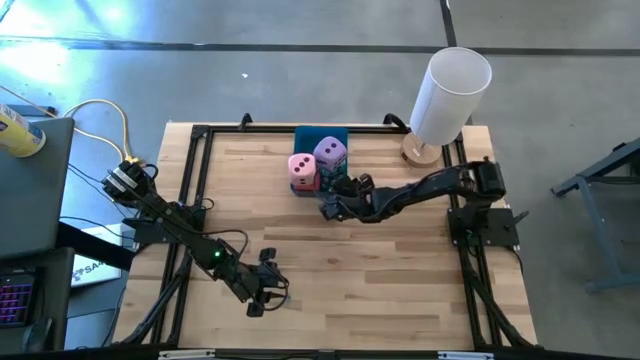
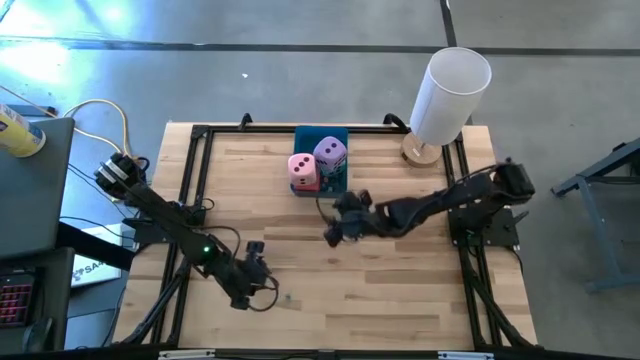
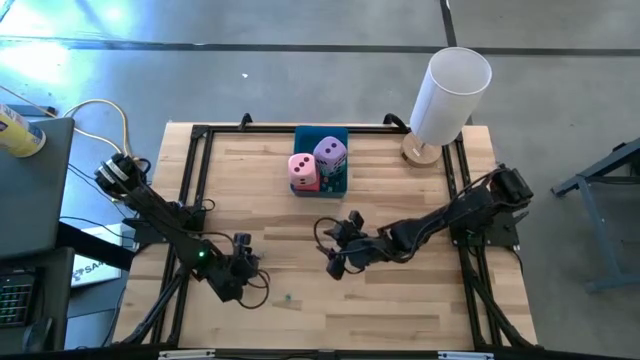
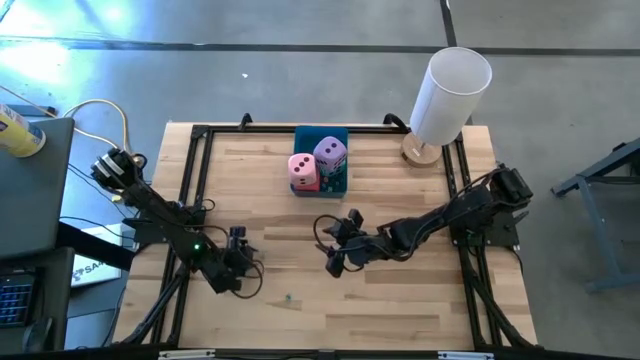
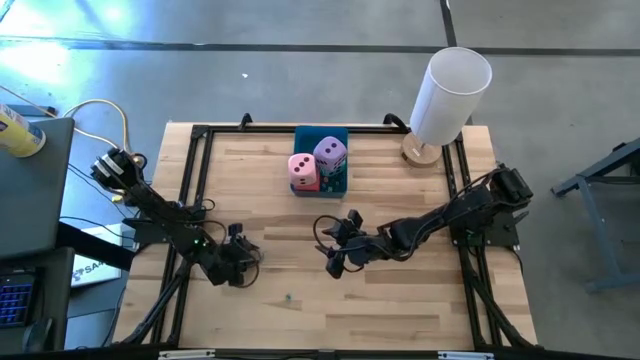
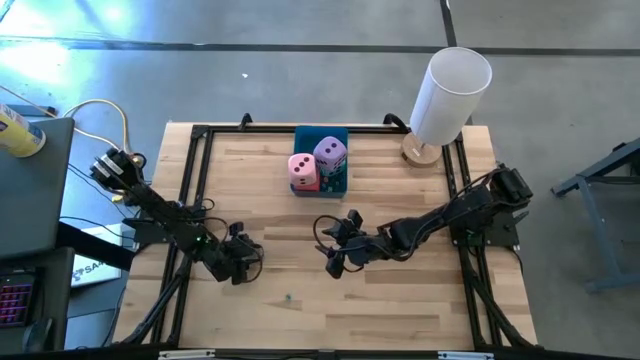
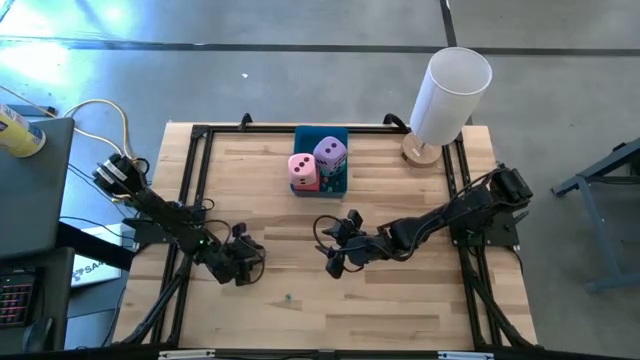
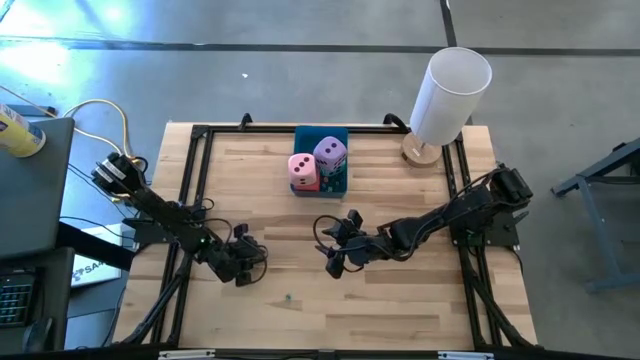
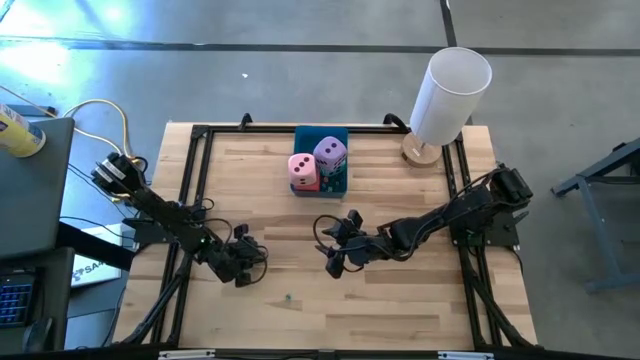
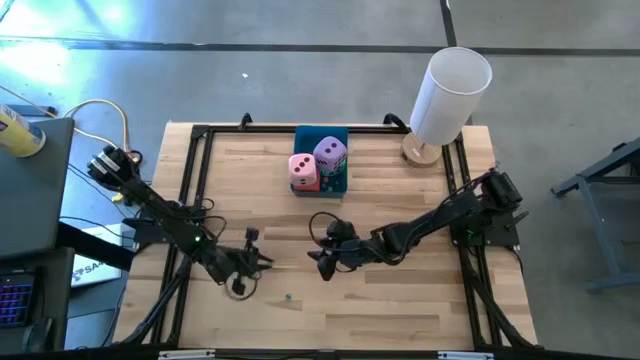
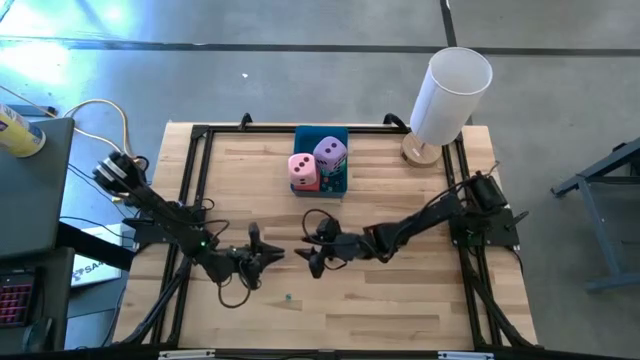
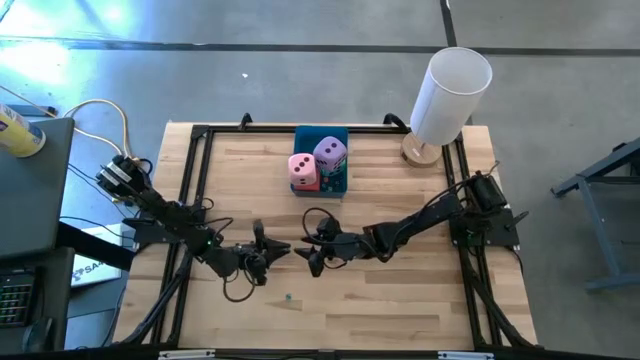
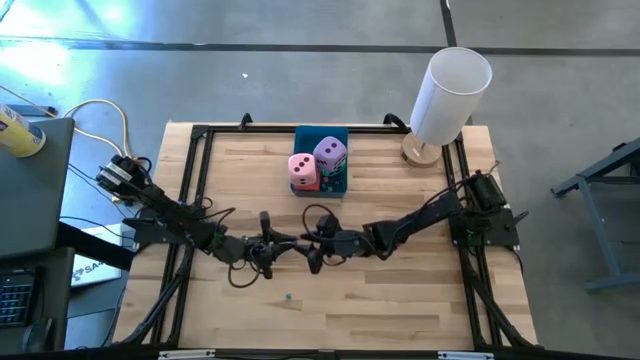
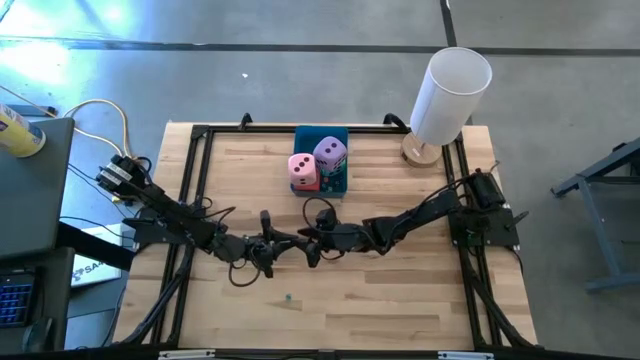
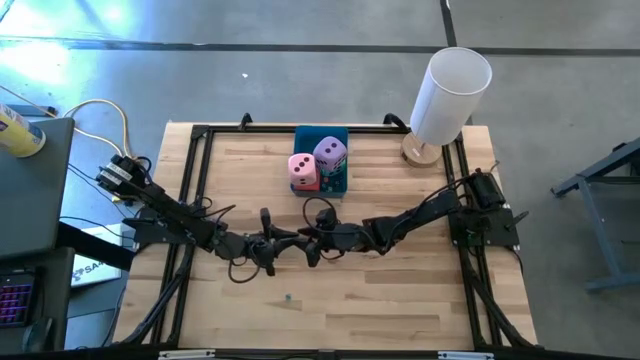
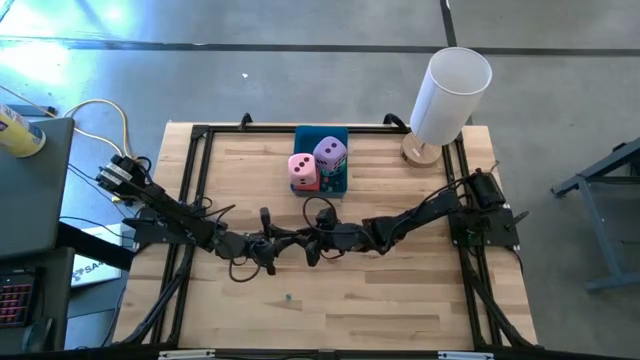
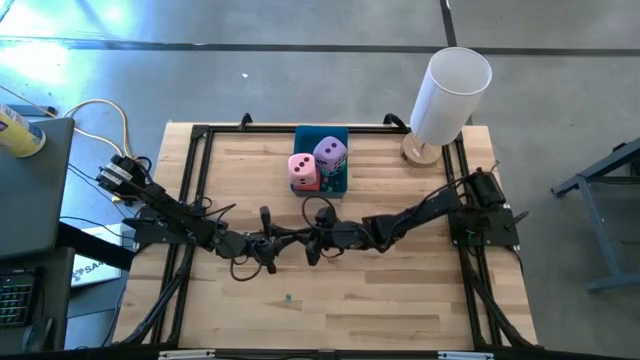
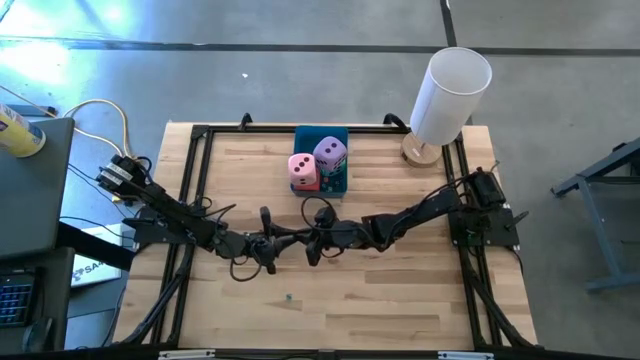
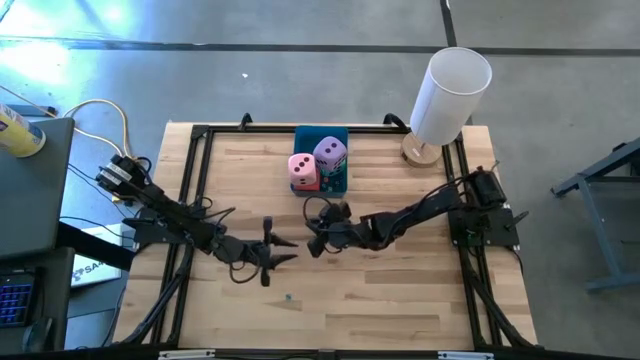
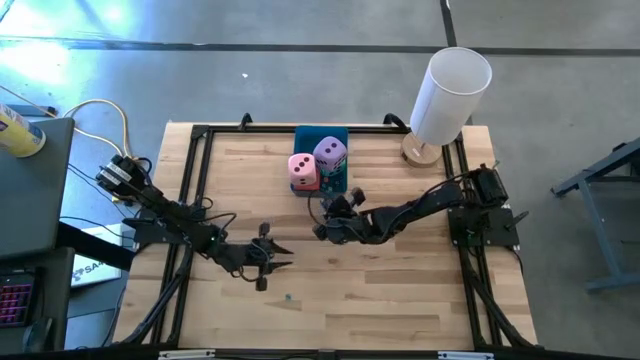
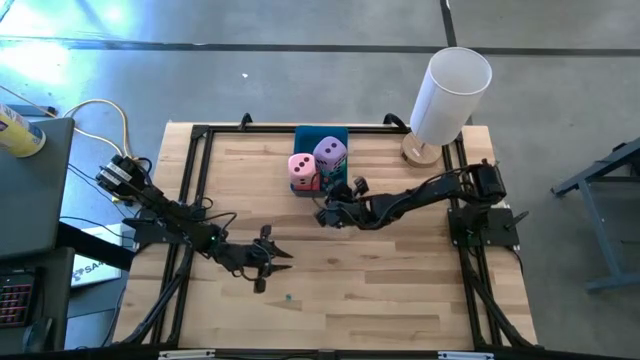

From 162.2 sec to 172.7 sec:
Task: Pick & Place Dice
Put the top small light blue die into the blue bin

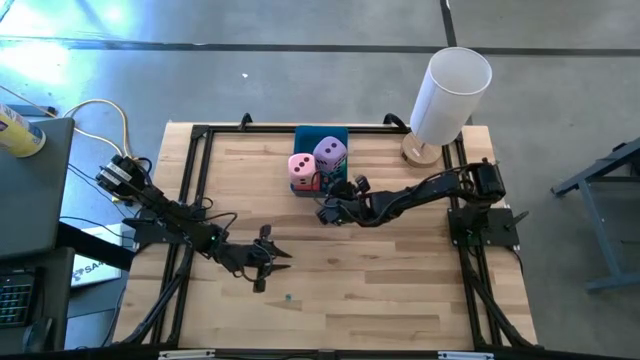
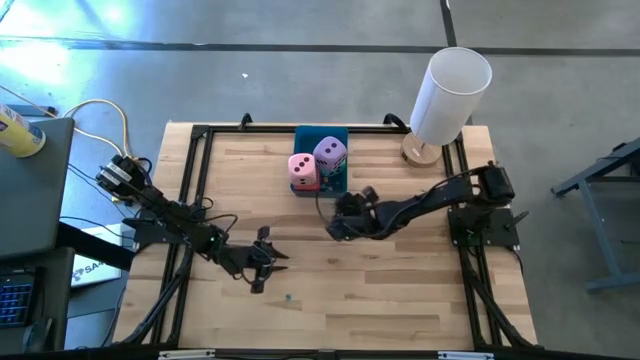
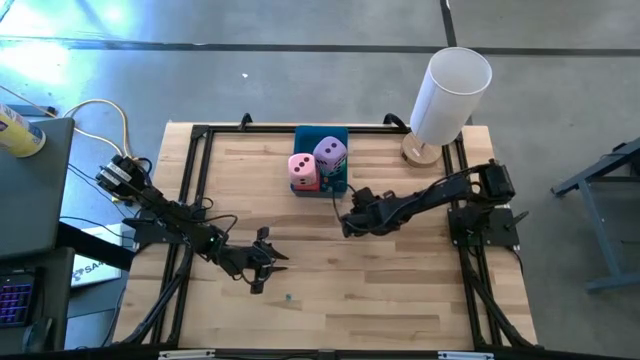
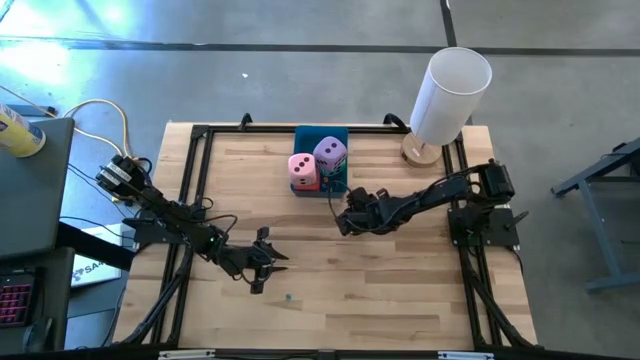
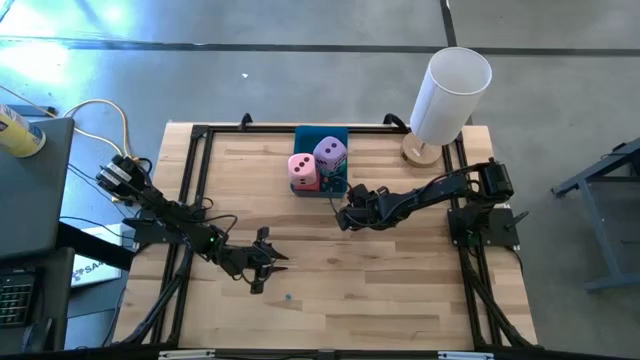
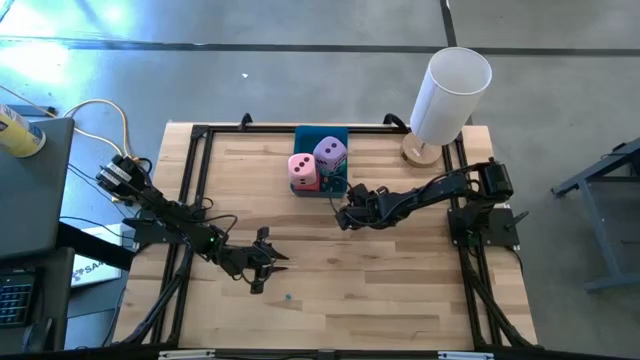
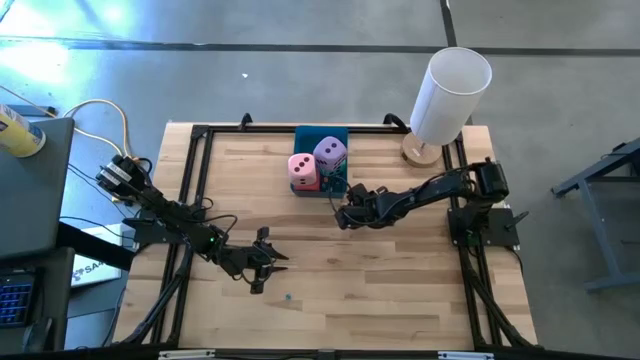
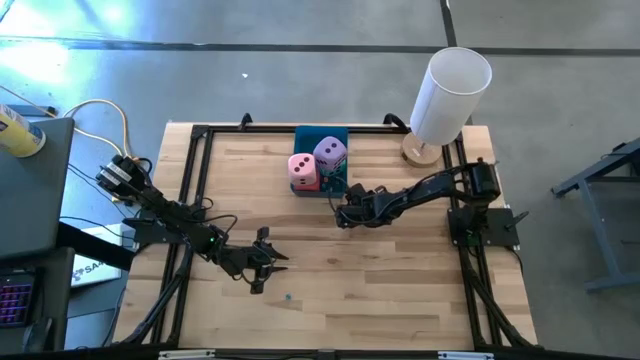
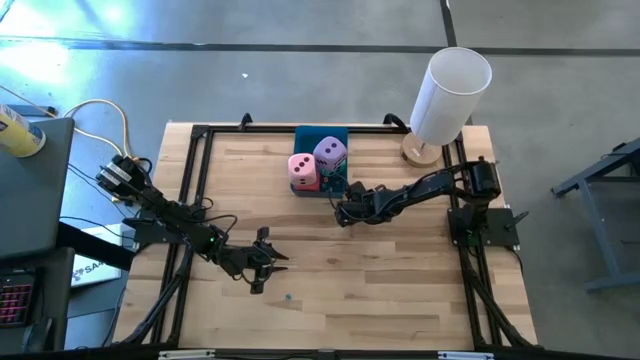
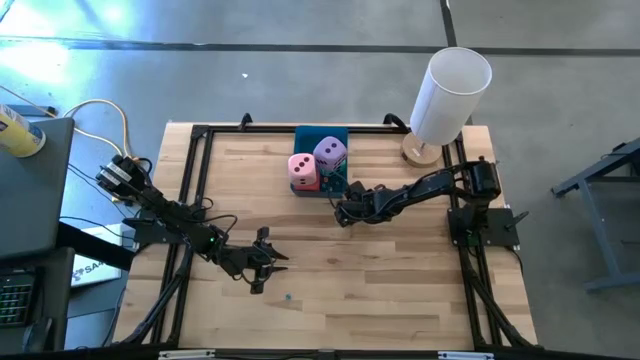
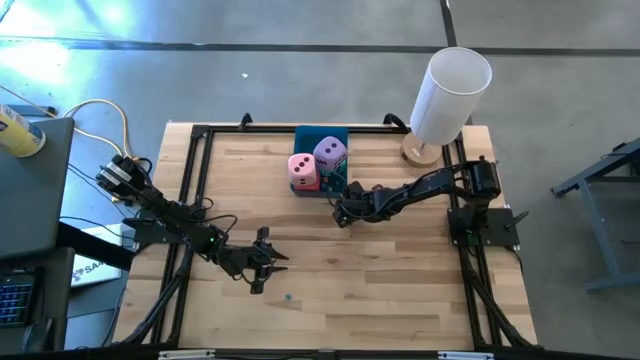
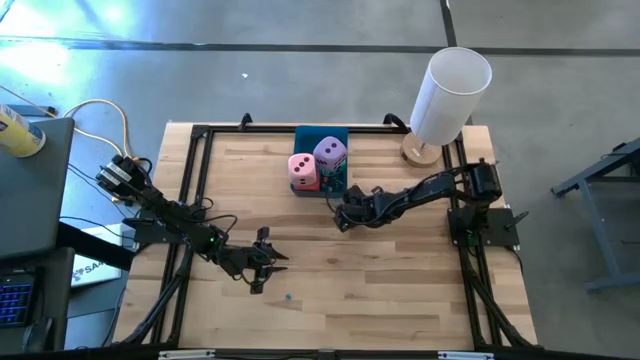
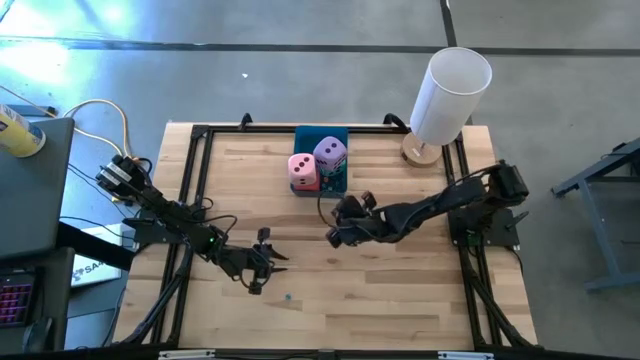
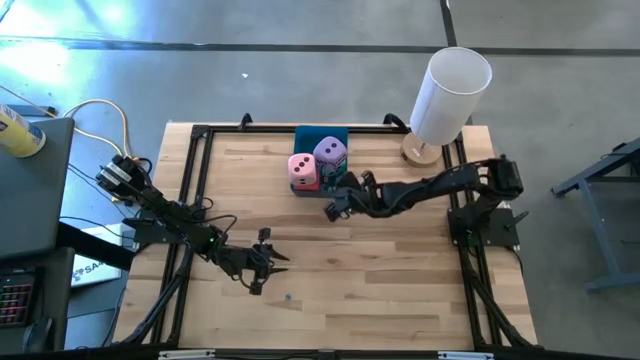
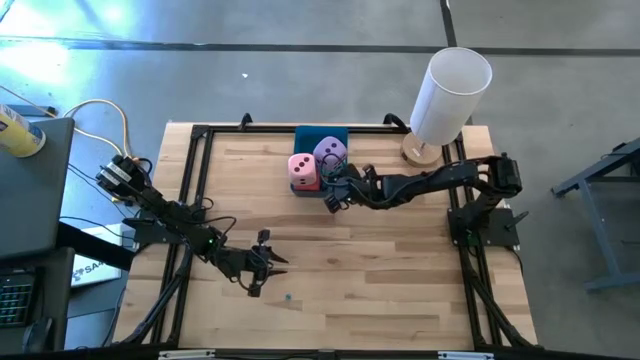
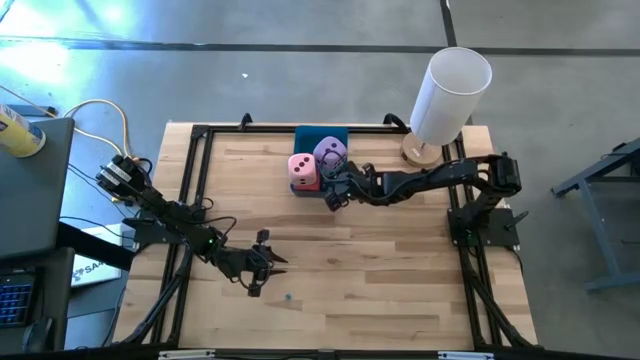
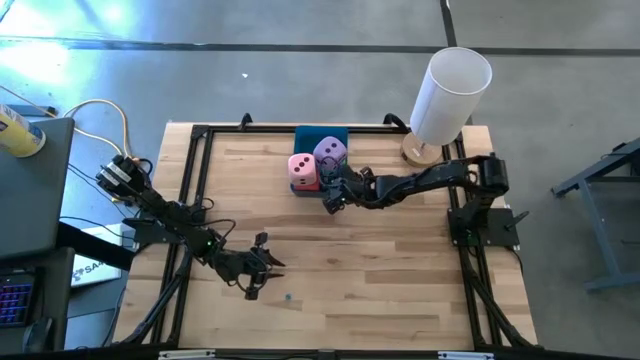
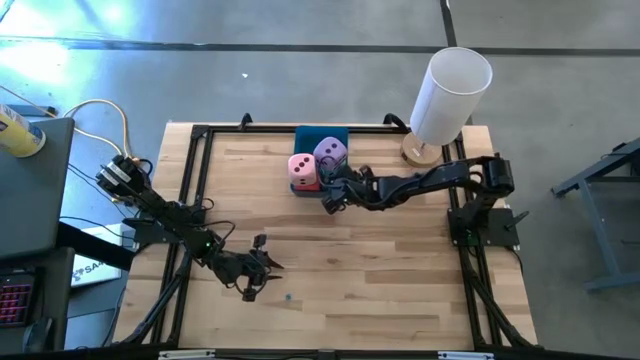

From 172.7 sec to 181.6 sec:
Put the top small light blue die into the blue bin

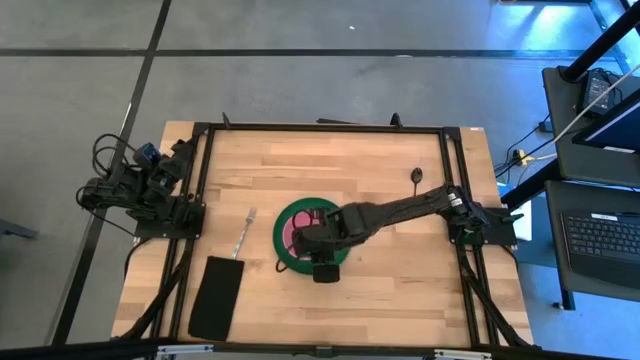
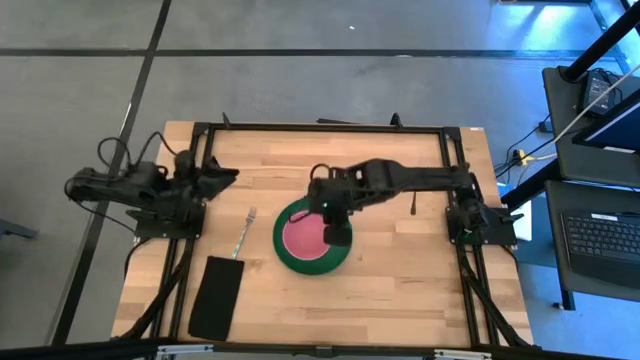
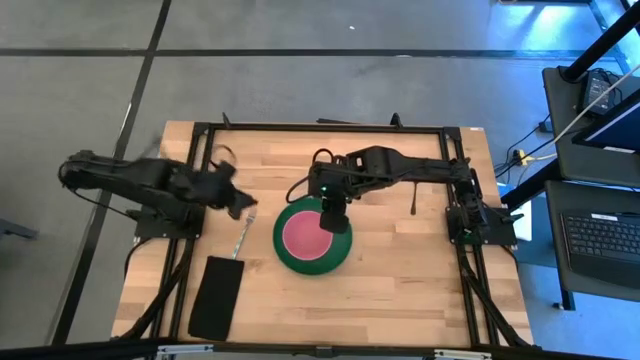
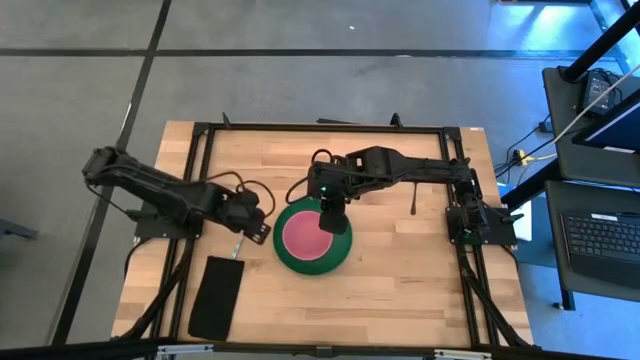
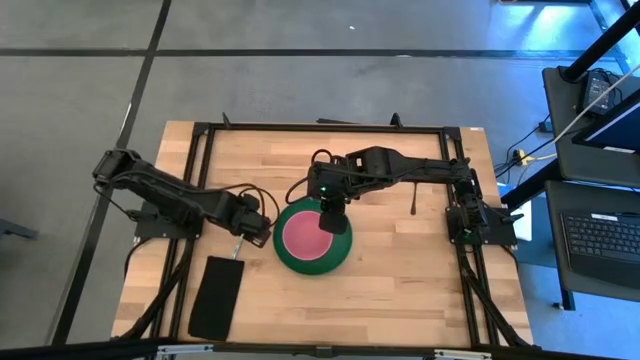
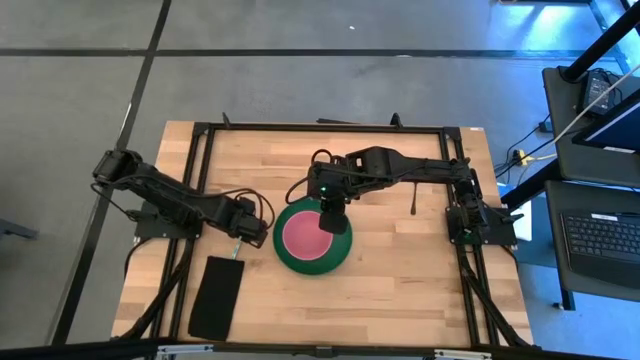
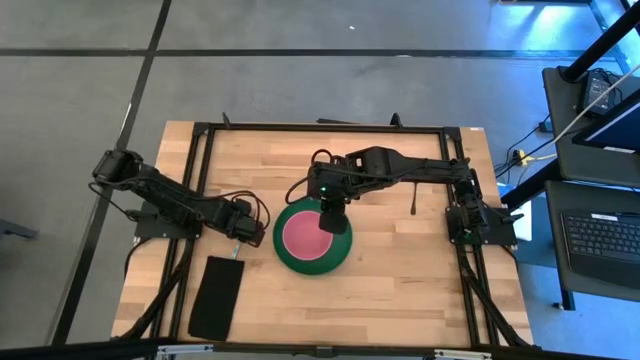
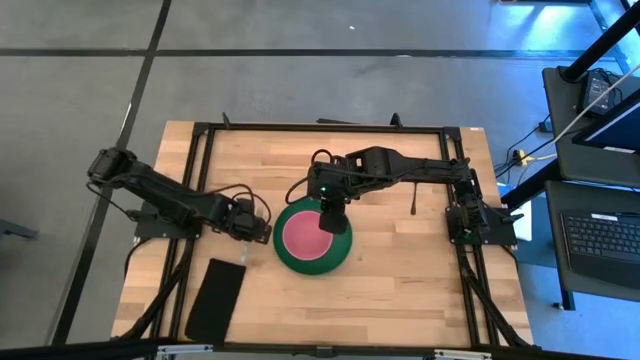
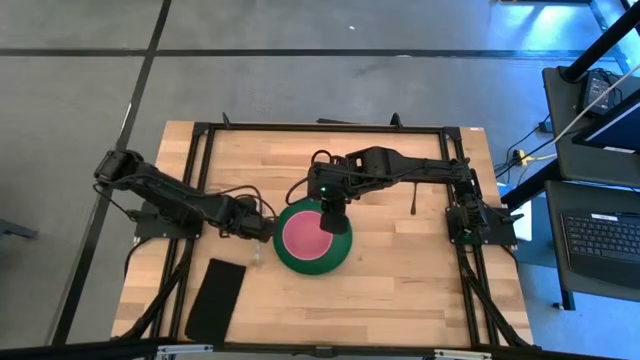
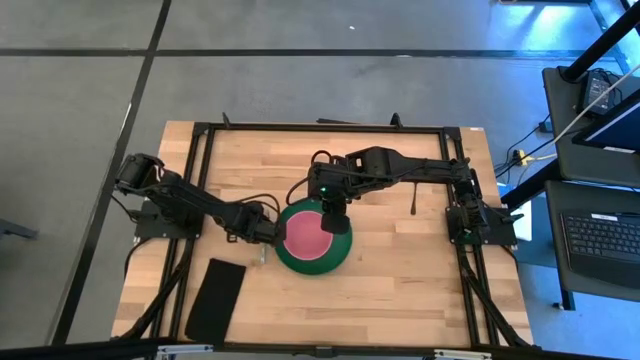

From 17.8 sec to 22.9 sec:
Task: Set table place
Put the silver fork on the left side of the green plate
